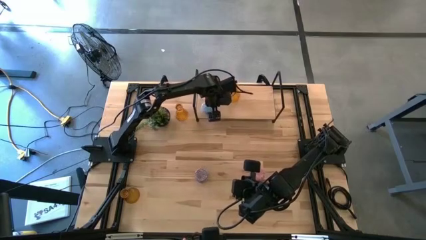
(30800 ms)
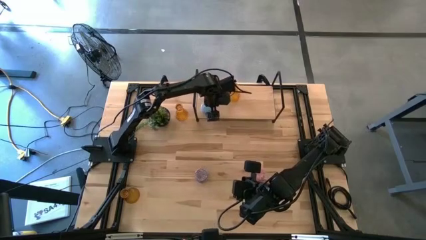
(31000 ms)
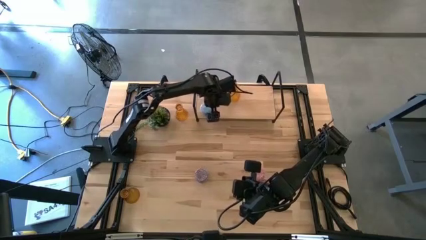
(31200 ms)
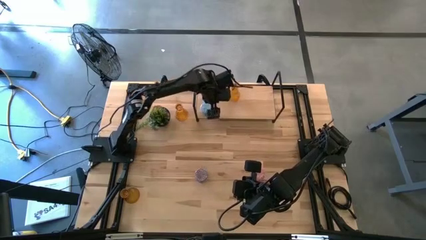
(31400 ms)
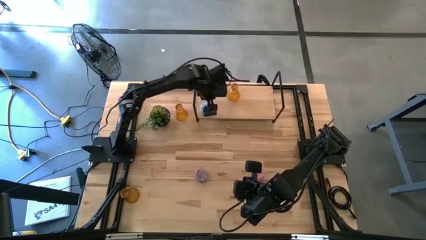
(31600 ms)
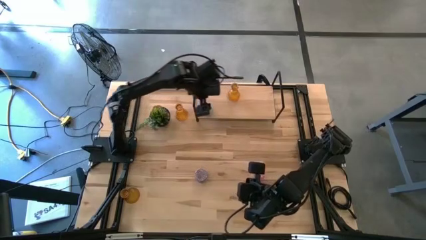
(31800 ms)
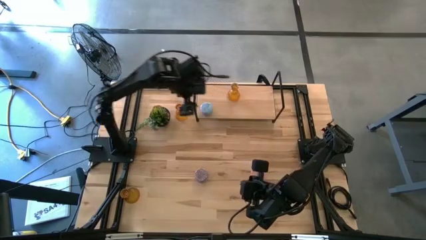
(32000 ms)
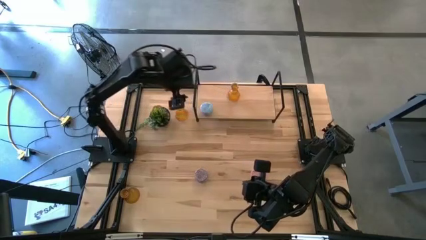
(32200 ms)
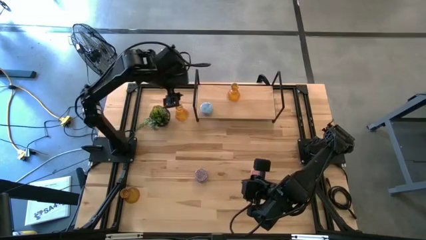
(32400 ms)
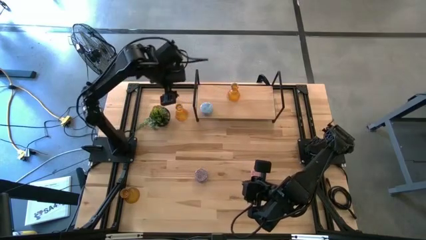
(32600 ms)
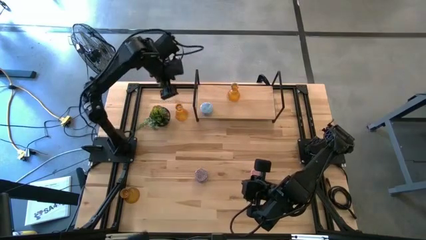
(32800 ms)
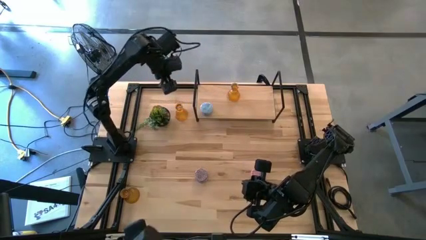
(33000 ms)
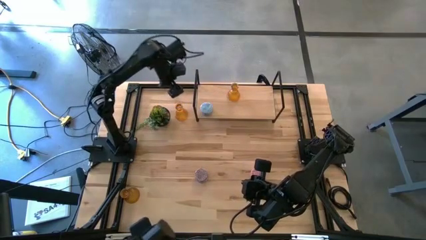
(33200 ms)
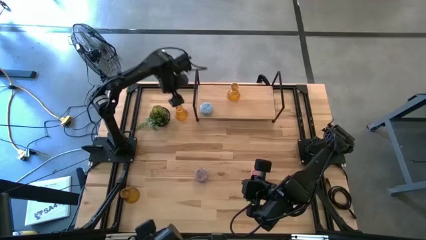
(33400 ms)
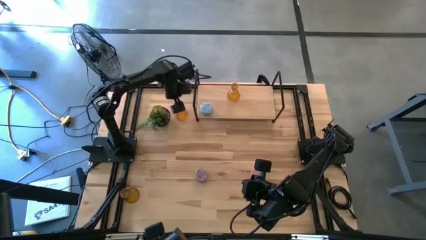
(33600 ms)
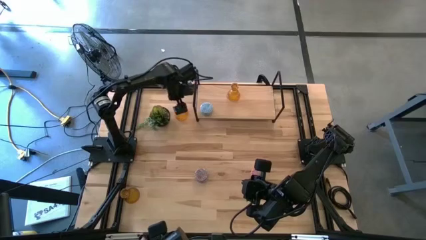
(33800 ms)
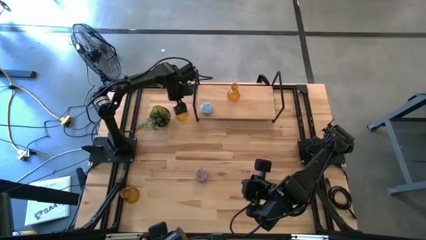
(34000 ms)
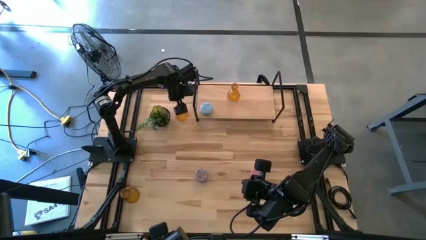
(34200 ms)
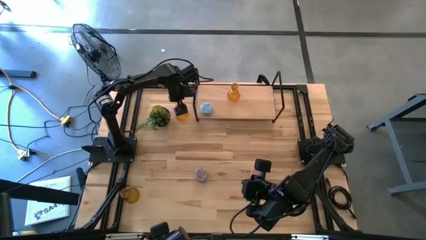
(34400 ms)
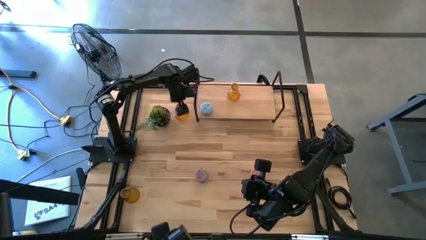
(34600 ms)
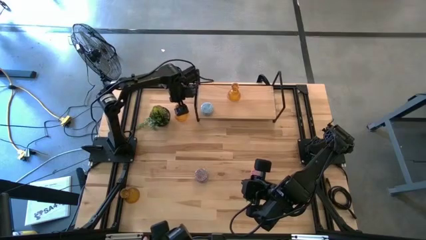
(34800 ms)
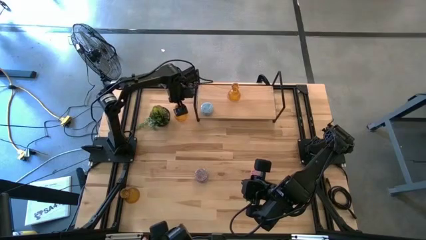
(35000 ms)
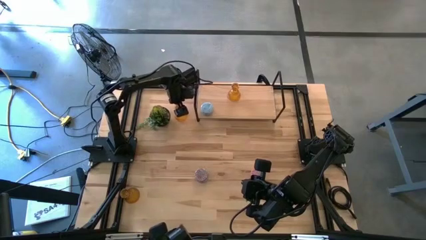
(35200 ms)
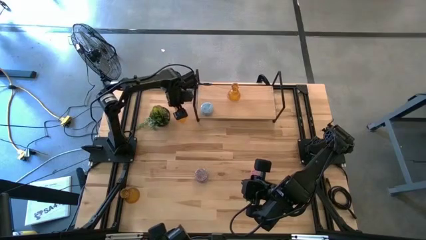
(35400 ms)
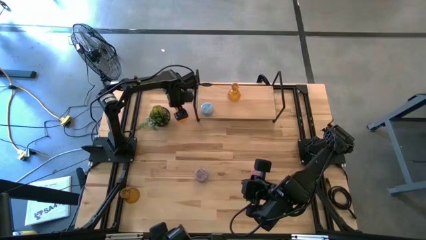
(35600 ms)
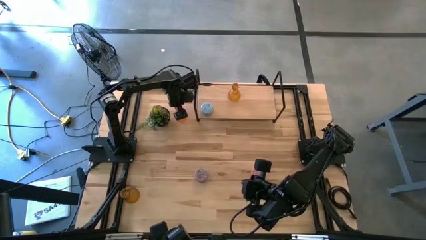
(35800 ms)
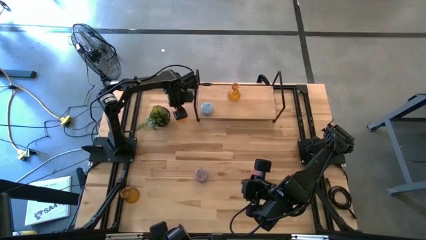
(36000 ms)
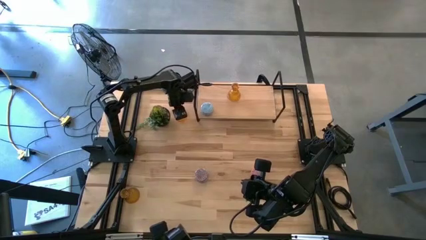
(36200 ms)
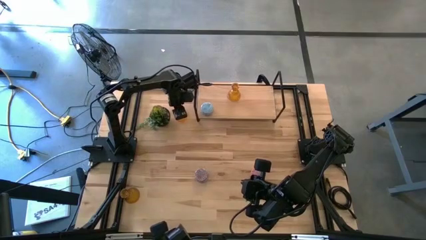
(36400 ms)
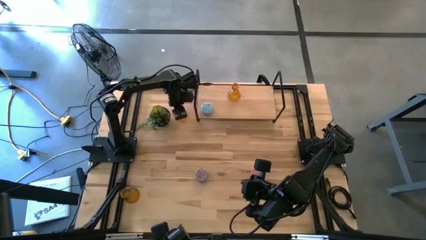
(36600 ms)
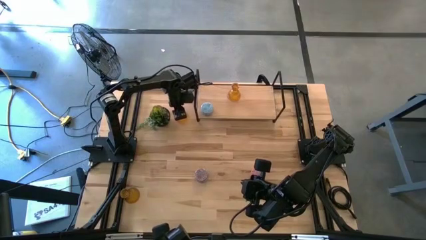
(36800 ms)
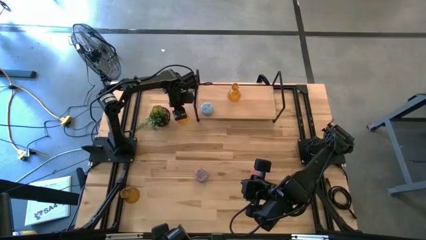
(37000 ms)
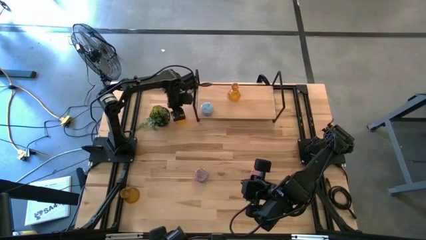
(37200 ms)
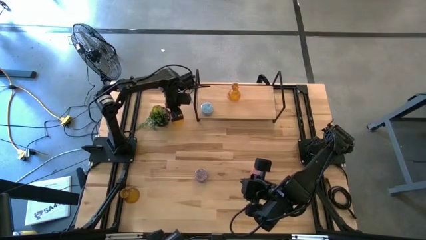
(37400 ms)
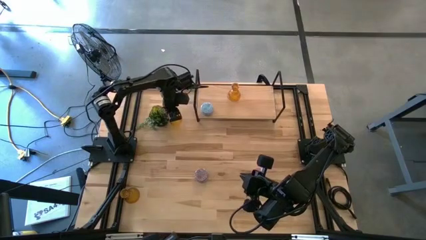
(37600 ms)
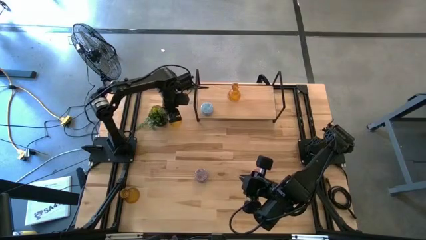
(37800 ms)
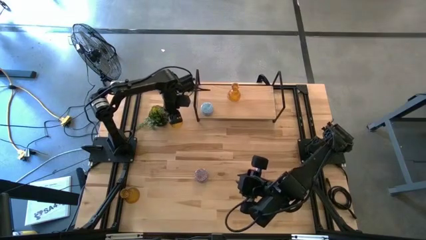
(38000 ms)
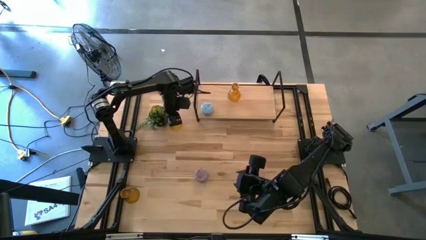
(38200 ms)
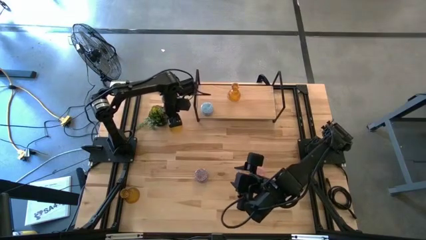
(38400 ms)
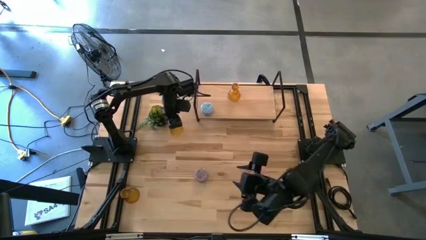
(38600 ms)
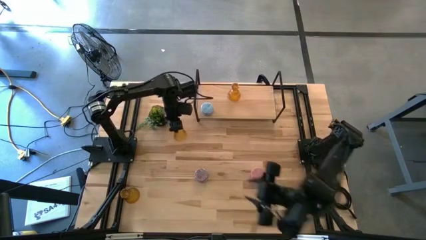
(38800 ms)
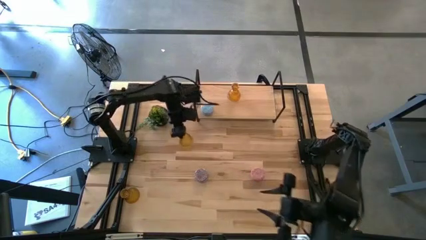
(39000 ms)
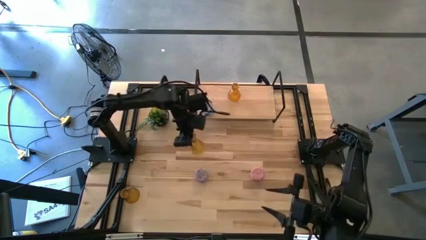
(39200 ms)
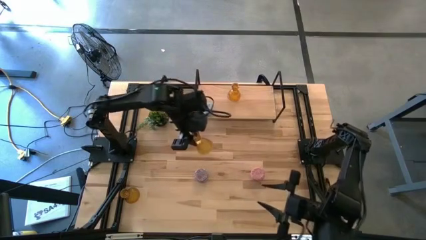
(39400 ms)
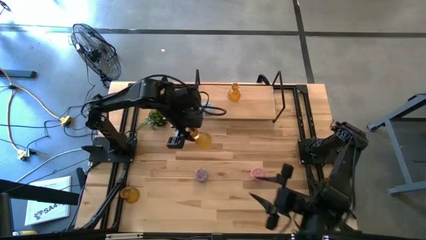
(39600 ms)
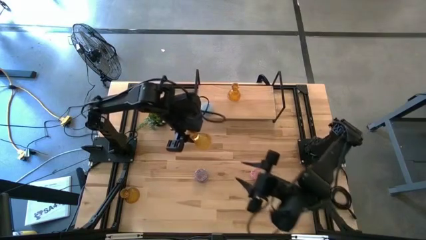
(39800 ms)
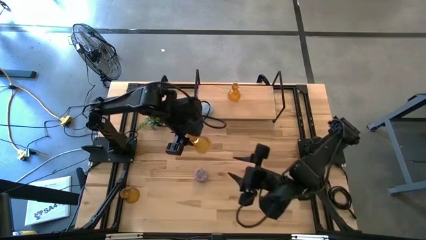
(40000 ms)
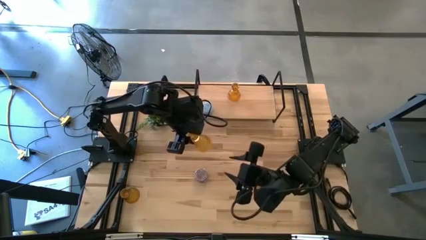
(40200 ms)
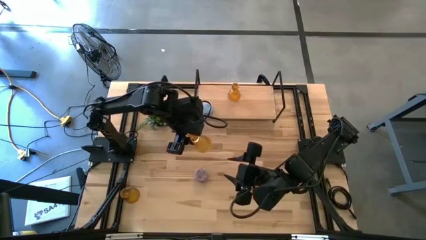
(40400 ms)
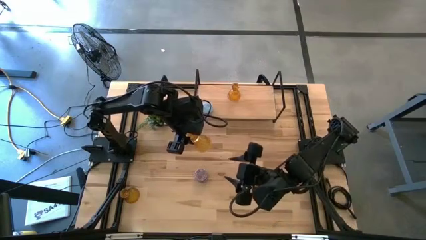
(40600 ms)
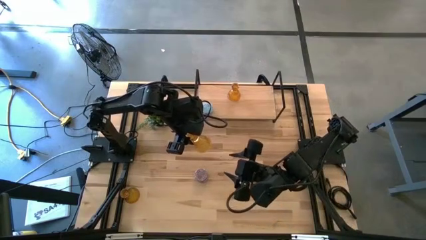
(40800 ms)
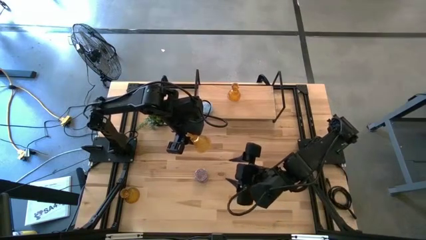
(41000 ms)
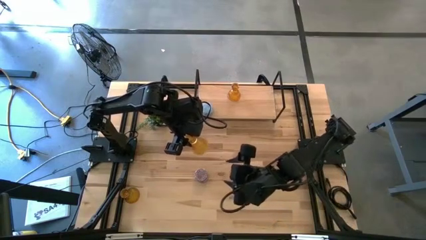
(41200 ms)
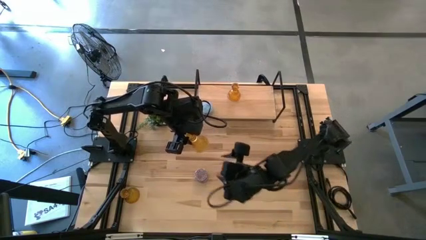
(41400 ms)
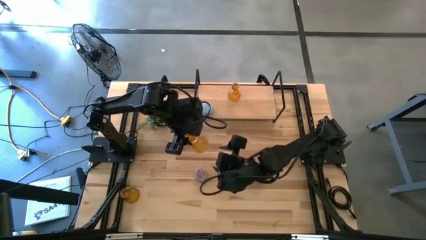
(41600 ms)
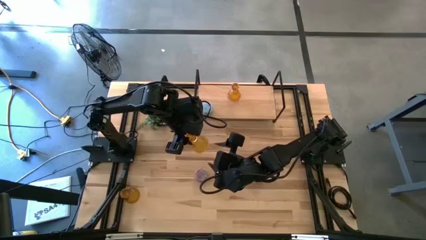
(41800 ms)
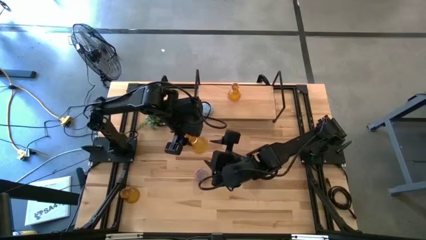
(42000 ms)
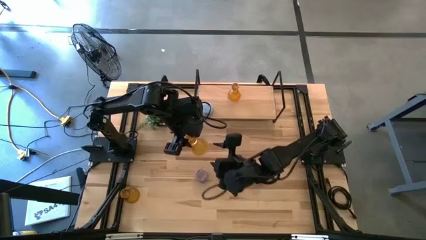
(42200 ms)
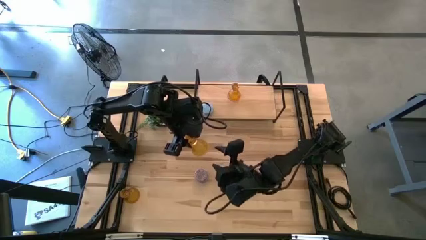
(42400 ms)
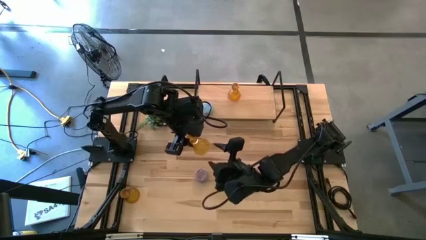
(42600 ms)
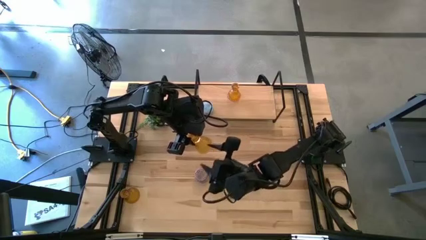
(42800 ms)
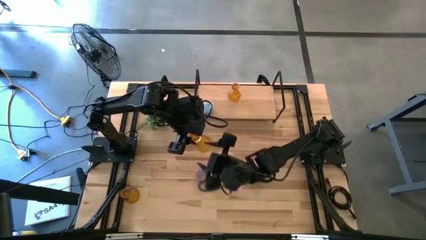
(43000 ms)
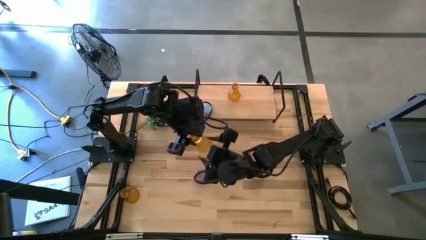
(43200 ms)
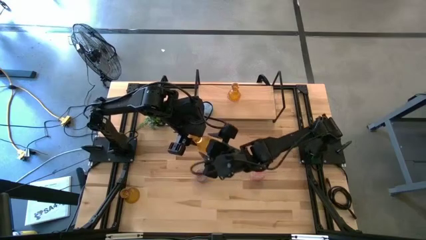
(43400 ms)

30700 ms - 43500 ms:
Task: Pick & Place candle stick holders
Put the top yellow candle holder on the shelf aligned with the other yellow candle holder

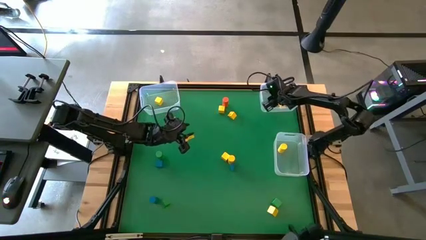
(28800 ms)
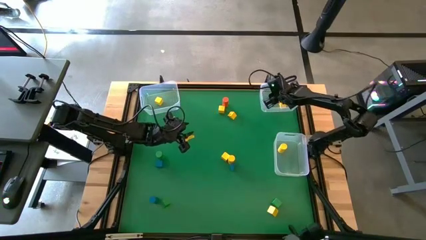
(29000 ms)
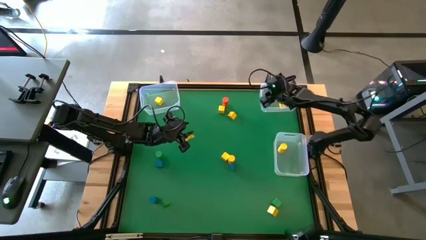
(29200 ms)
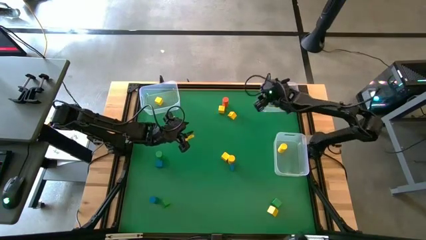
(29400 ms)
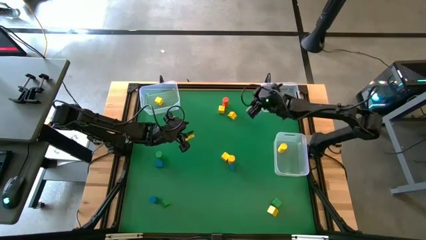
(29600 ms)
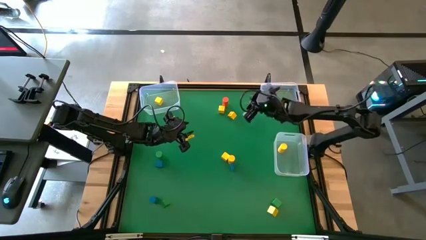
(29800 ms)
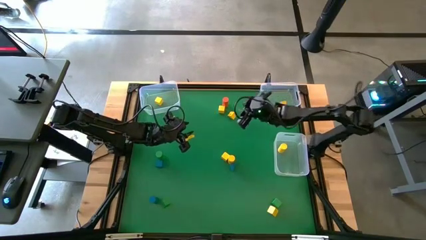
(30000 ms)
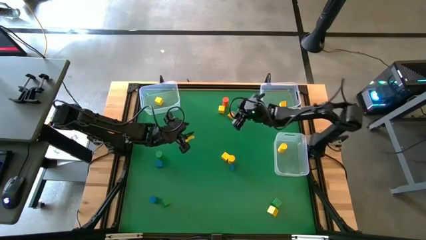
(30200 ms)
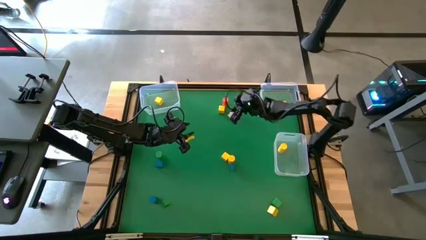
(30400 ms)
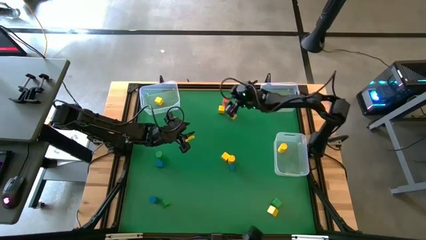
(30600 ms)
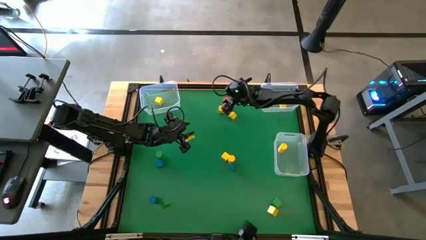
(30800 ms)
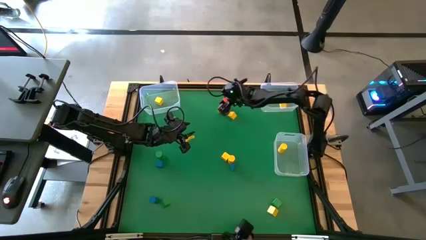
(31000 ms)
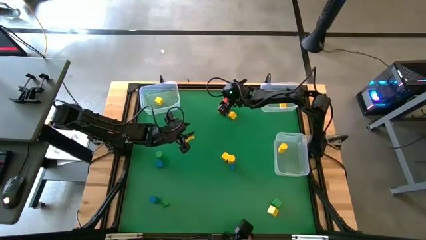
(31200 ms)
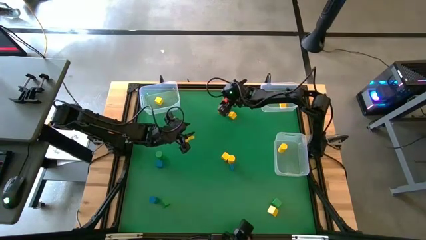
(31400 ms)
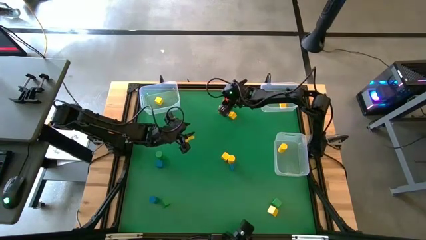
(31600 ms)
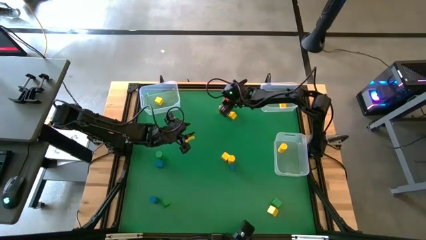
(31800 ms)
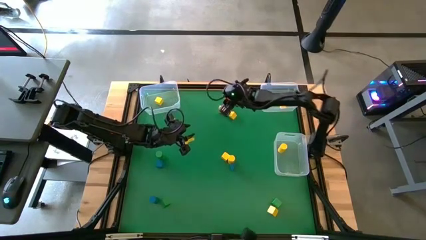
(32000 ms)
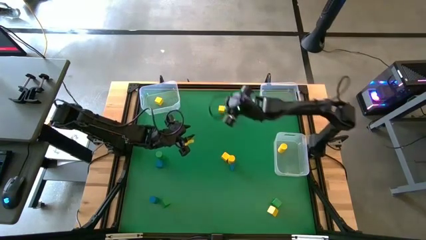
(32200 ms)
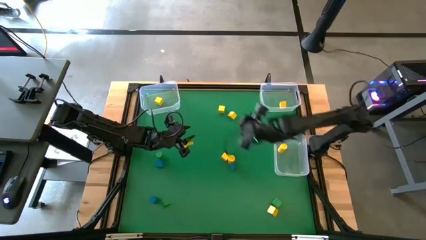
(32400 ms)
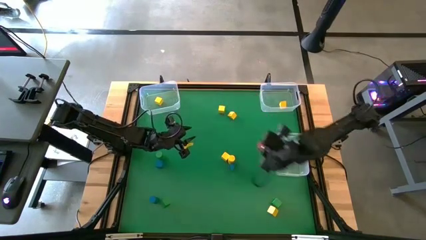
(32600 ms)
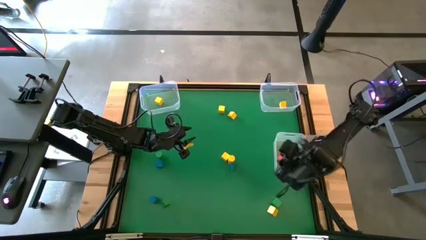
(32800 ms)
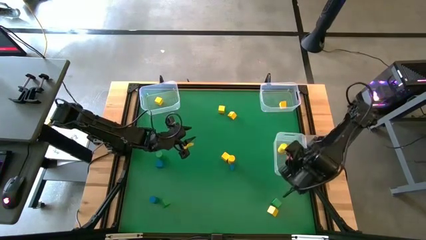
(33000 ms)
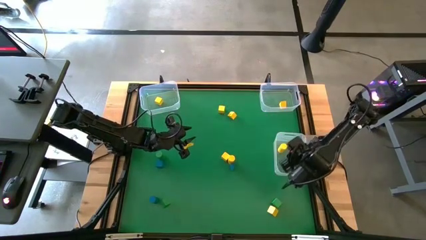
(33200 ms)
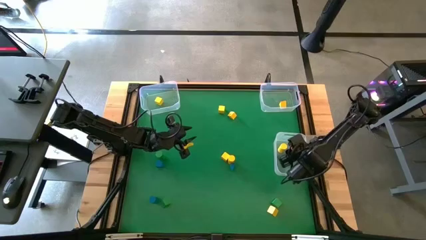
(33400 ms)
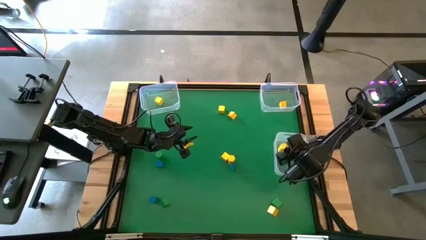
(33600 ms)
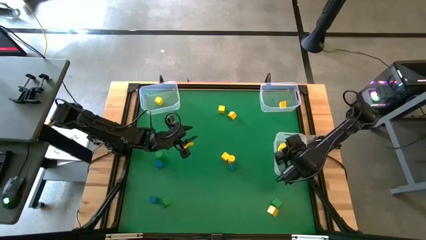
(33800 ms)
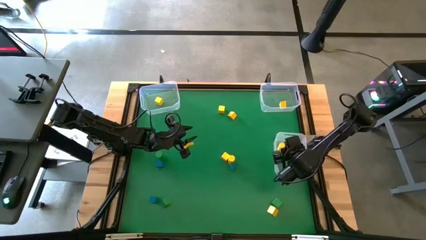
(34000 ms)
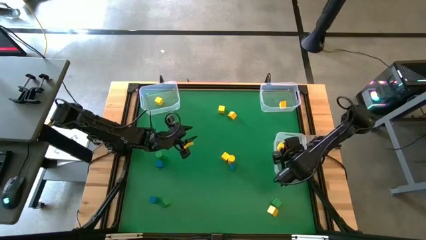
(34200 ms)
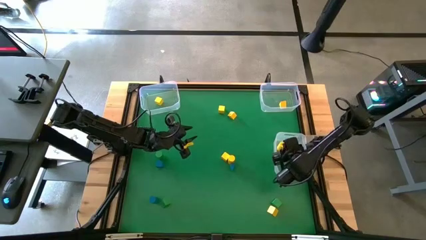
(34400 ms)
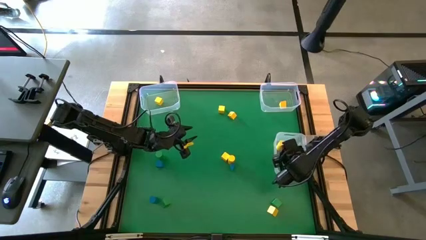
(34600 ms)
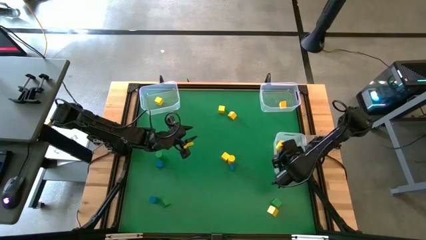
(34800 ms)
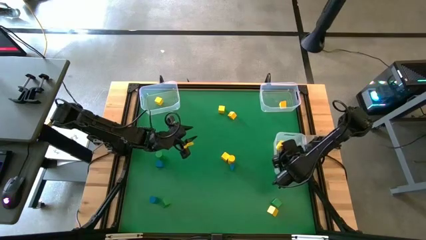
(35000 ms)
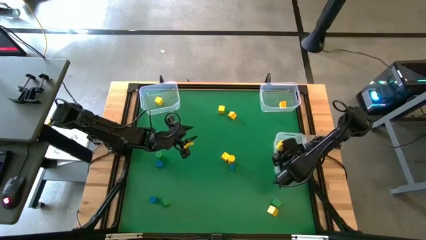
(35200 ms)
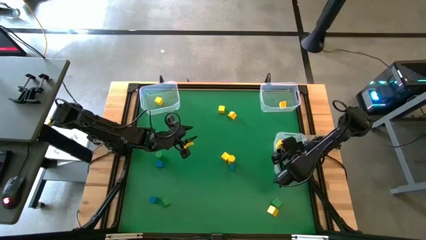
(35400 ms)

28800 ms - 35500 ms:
Task: Sort blocks by size
Put the orange cylindrical block into the bottom transparent bin
